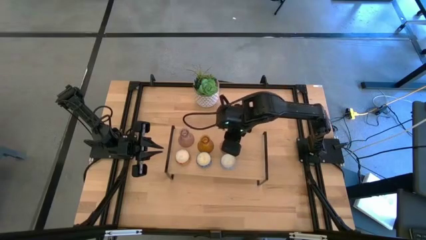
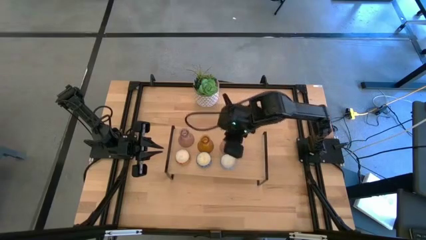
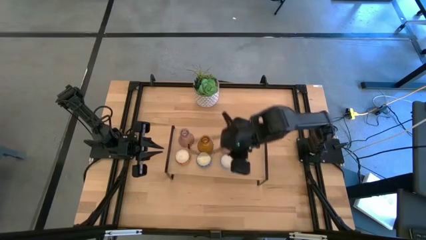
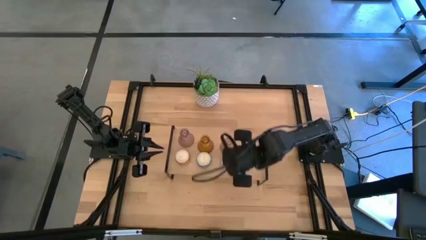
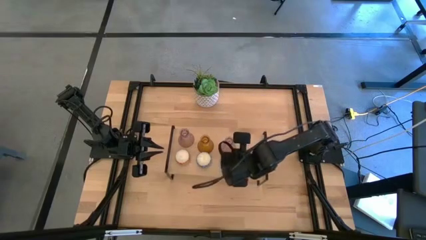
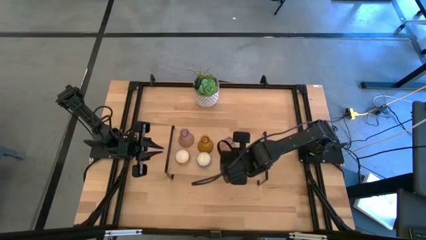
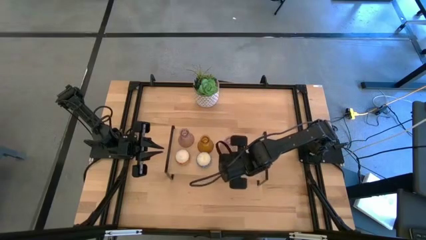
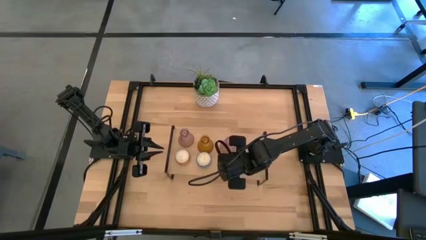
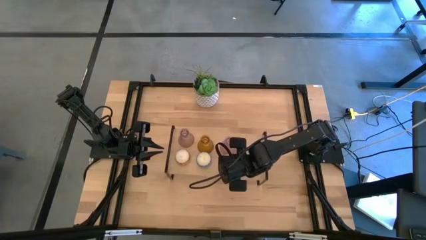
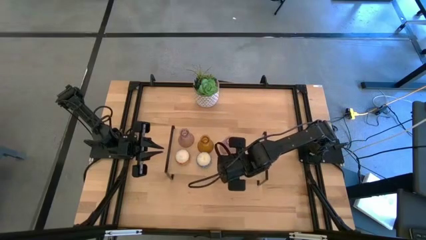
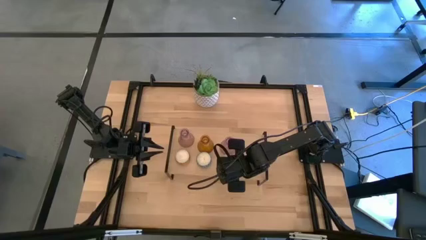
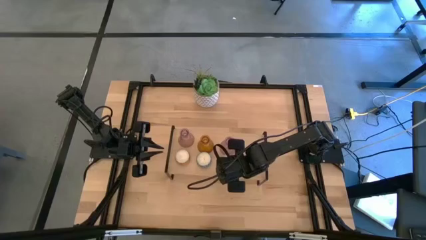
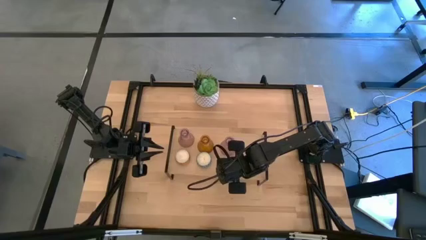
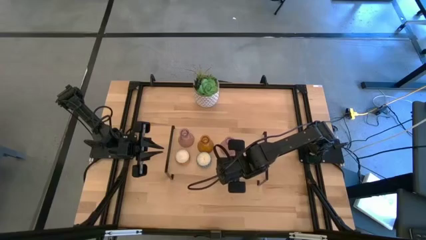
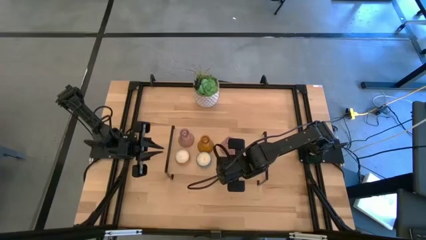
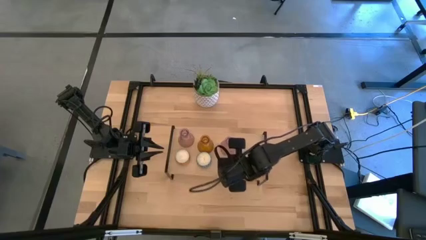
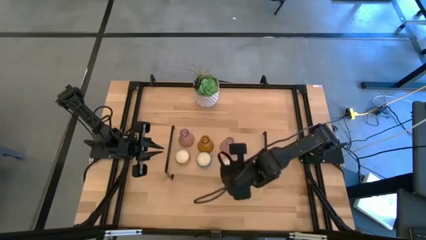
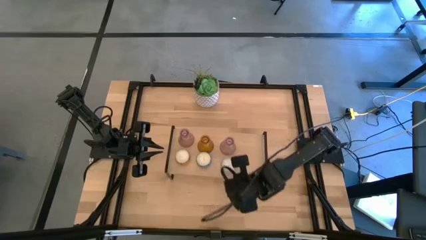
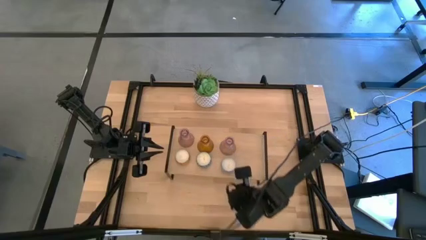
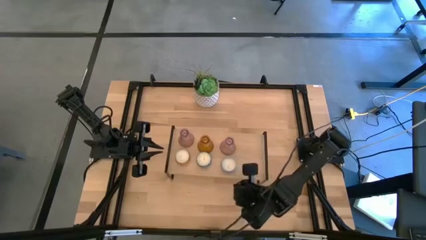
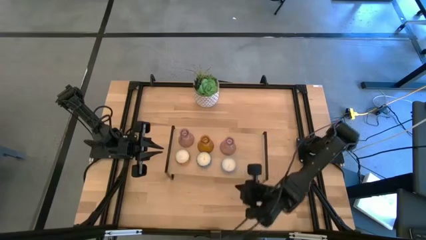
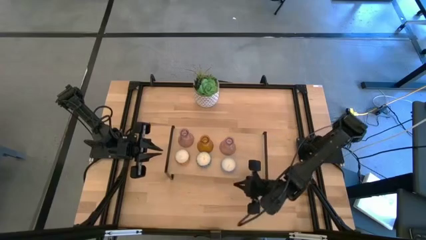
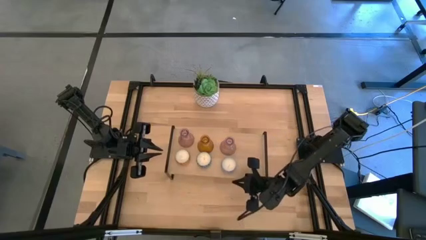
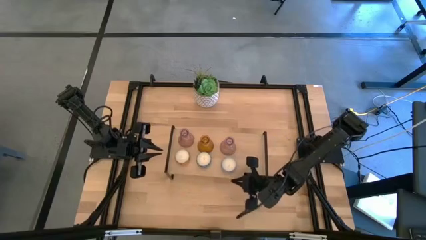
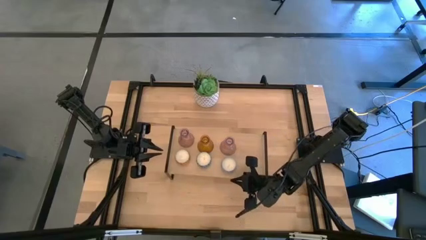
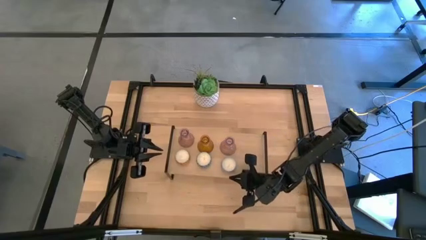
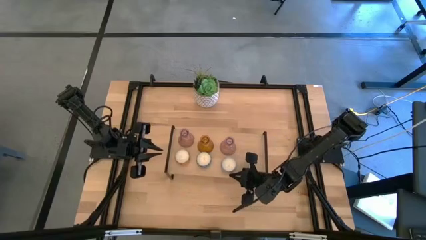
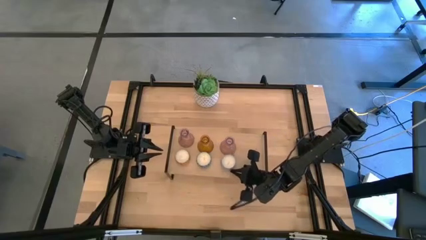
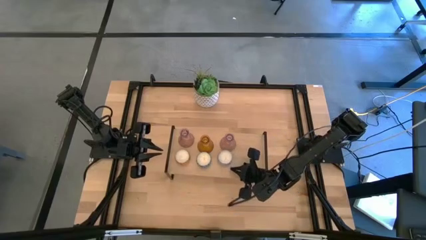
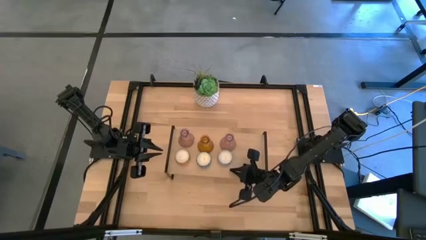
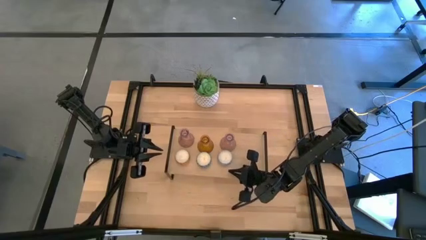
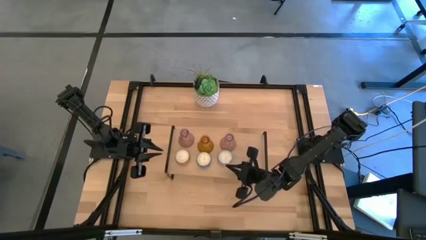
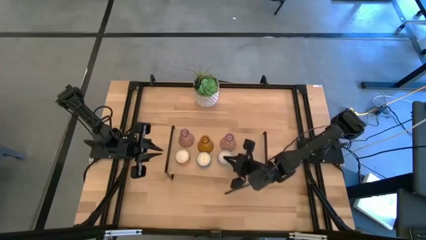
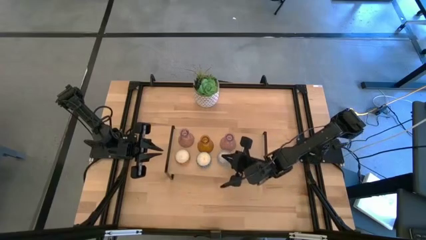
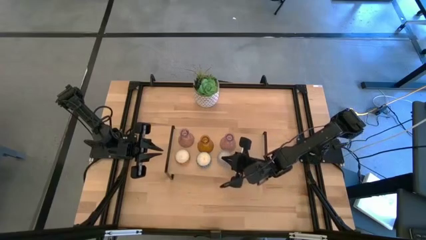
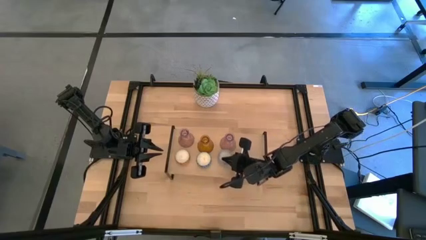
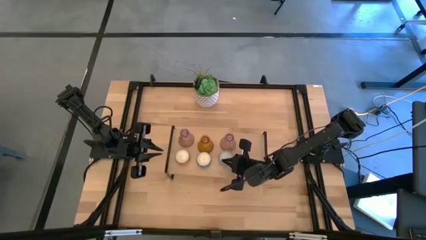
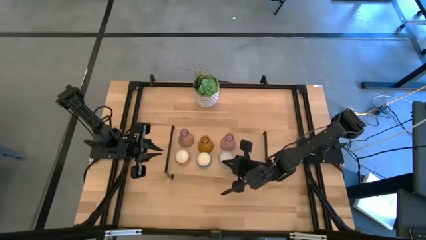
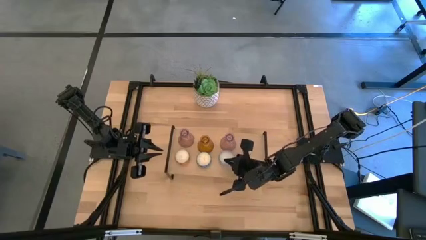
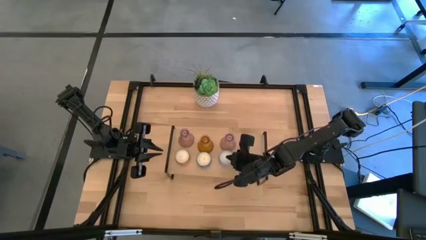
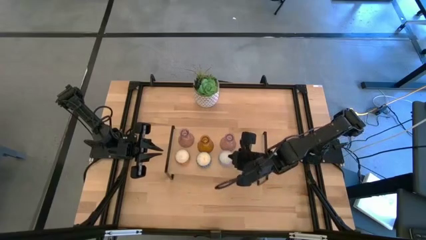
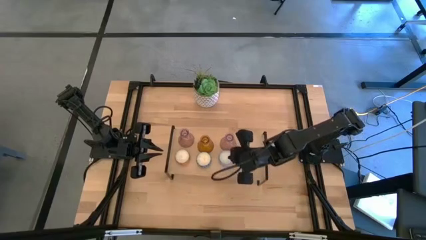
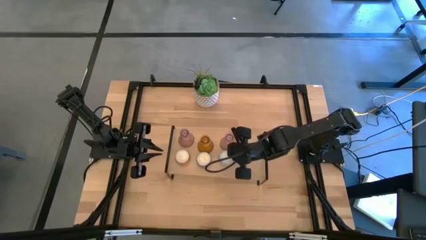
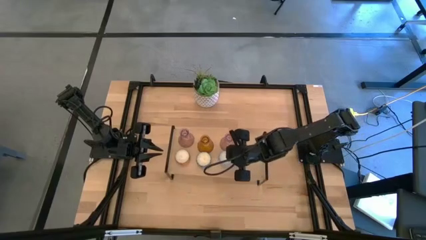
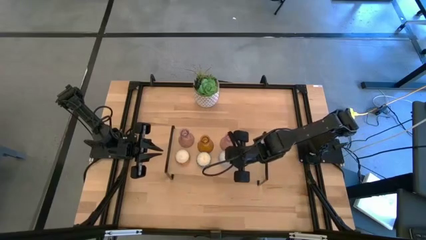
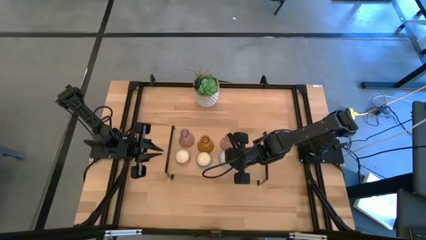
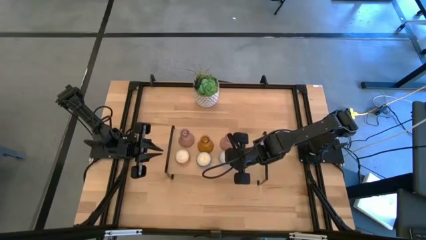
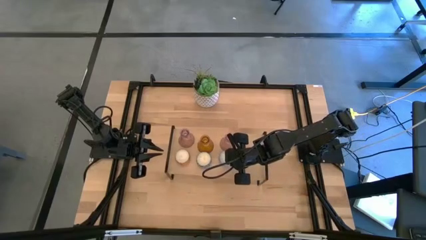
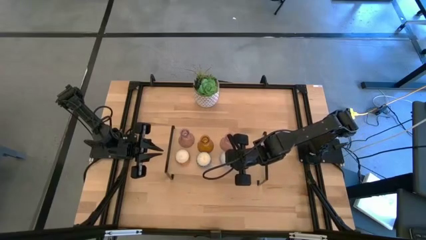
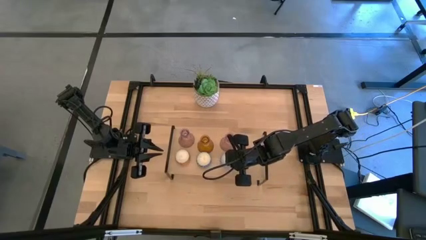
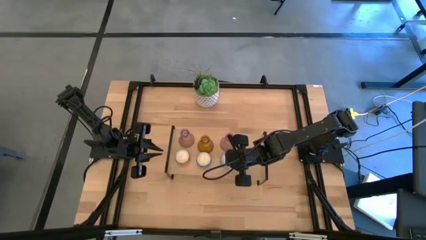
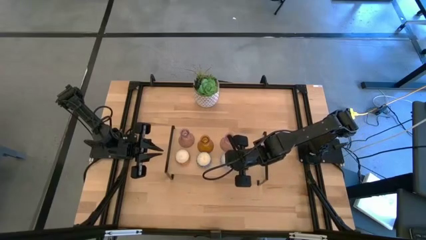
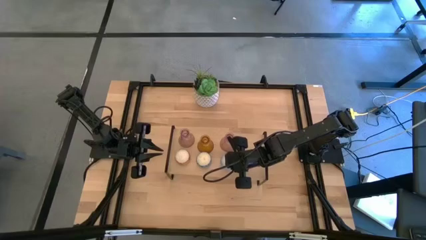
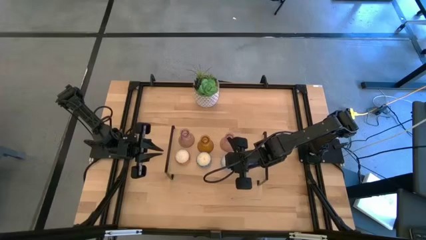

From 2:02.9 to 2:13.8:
Task: Pick & Place candle stick holders
Adjust the blue scented candle on the shelf

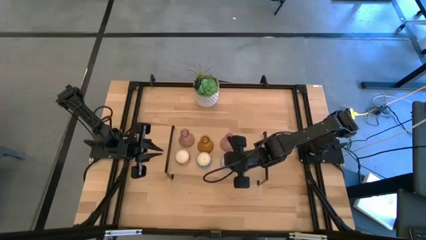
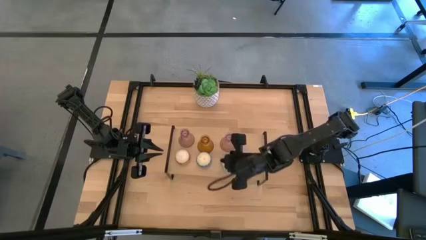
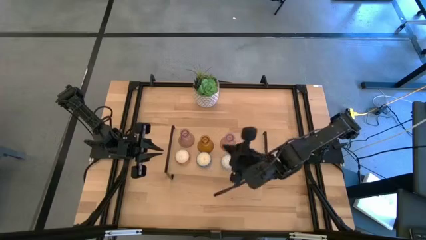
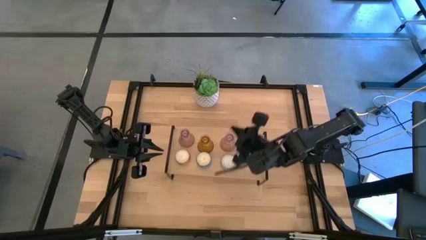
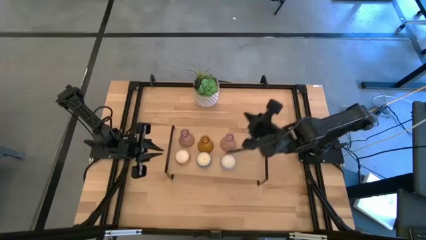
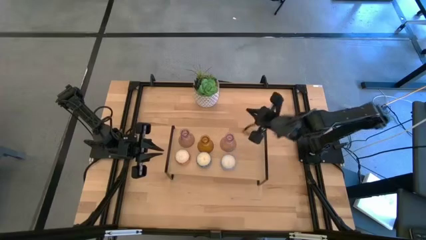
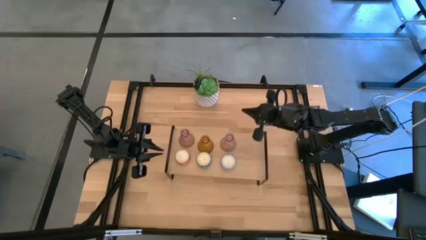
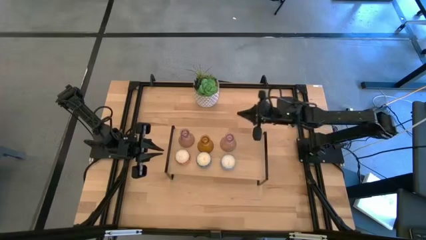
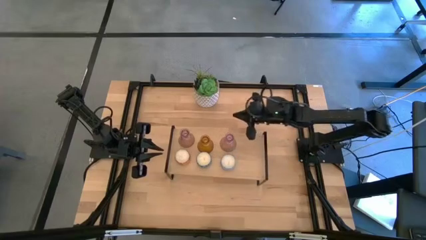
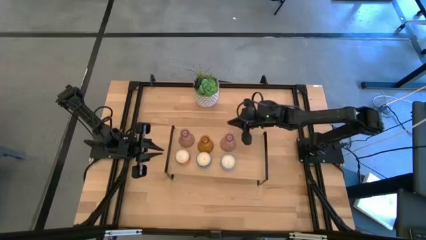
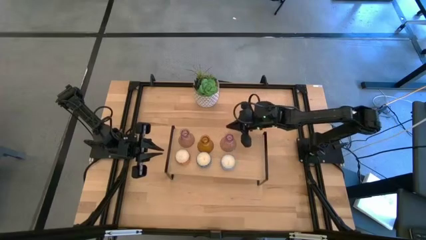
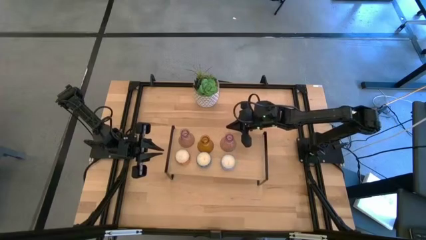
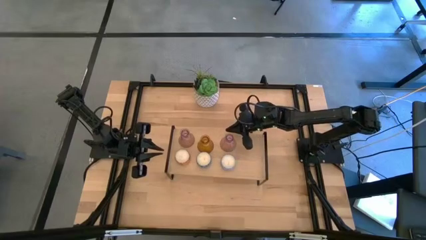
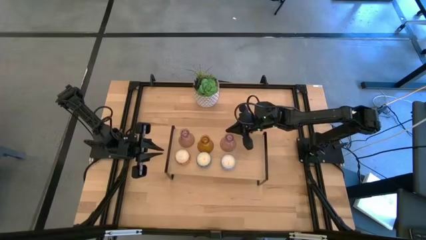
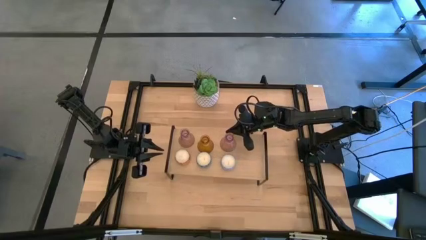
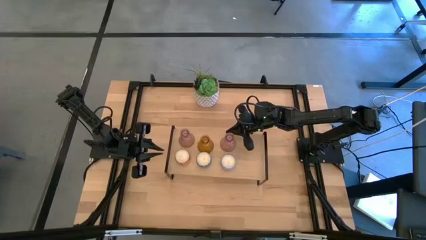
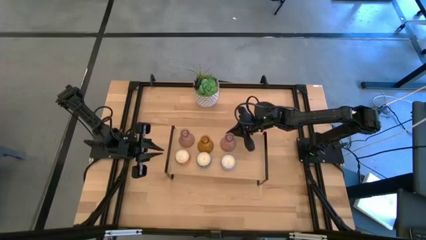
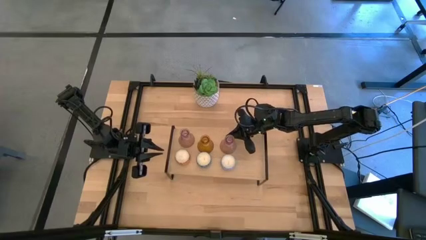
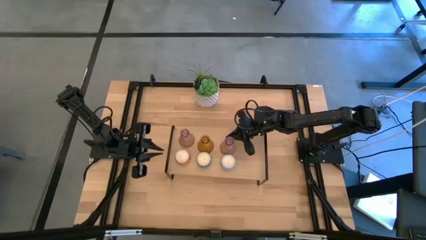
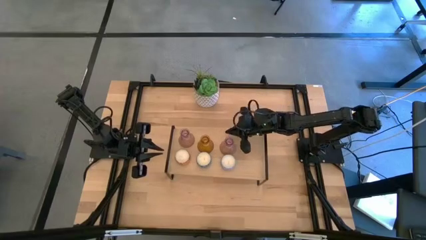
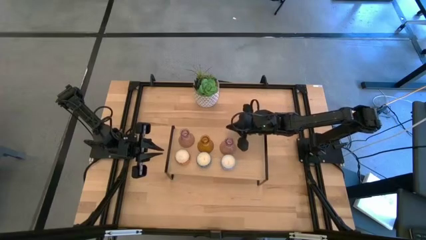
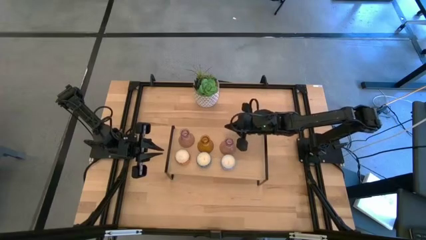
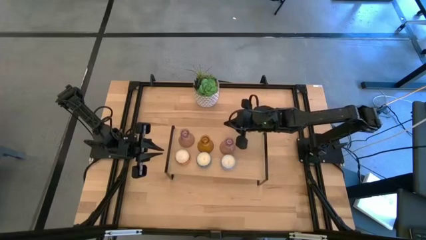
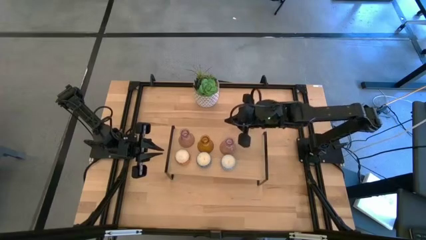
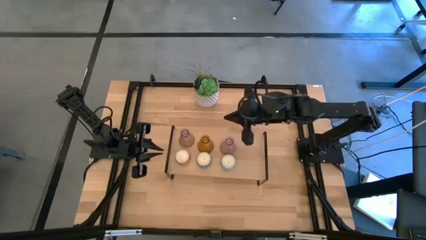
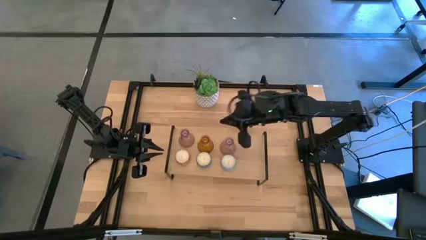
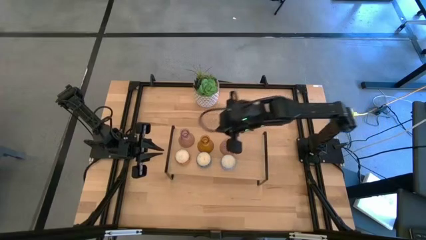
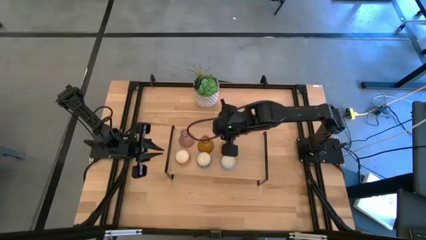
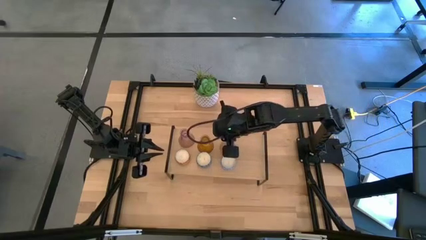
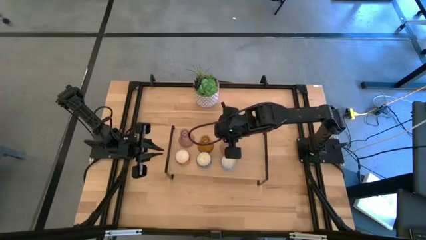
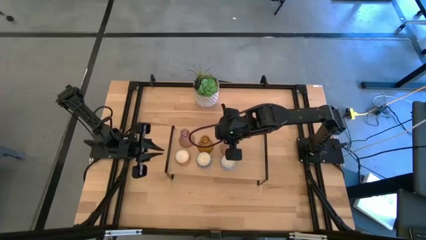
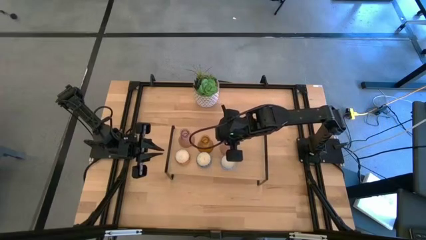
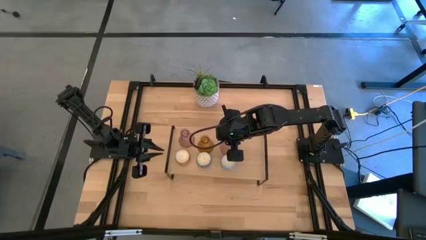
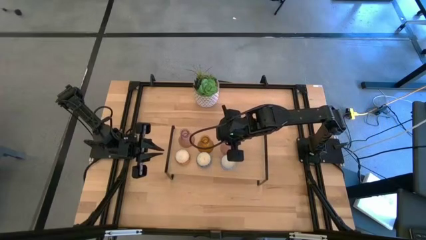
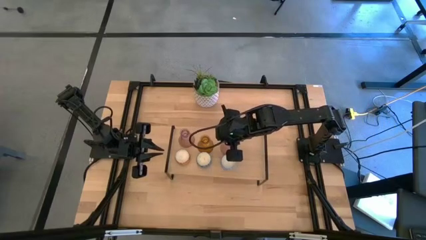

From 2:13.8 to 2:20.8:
Adjust the pink glass candle on the shelf
